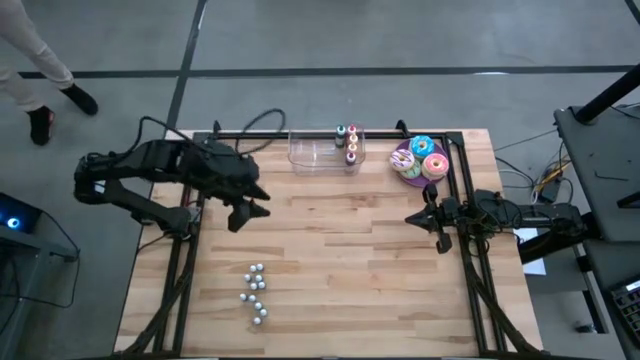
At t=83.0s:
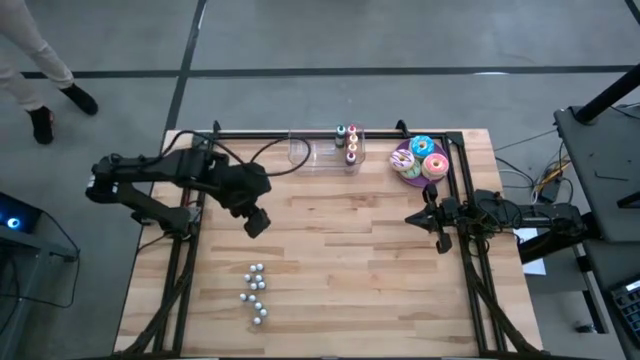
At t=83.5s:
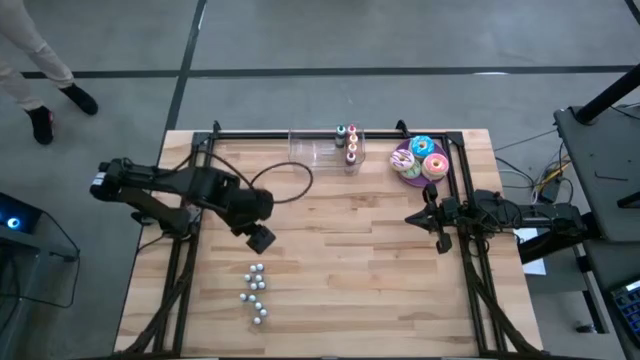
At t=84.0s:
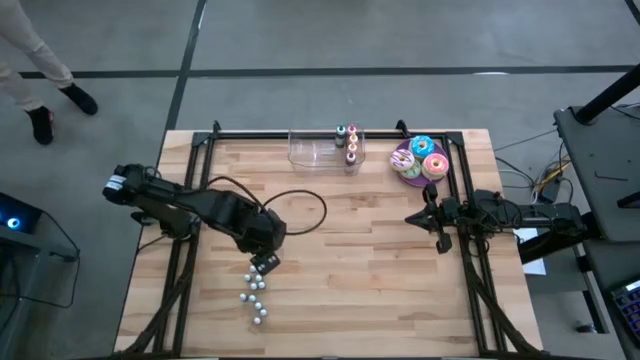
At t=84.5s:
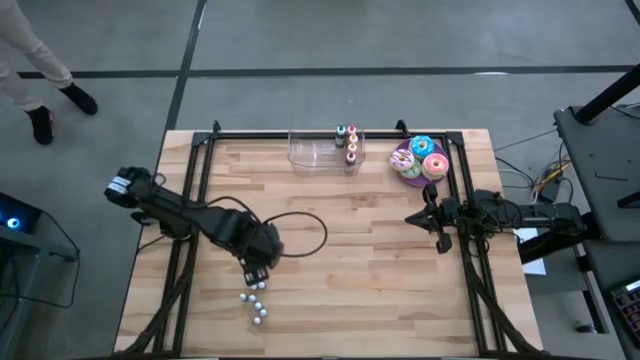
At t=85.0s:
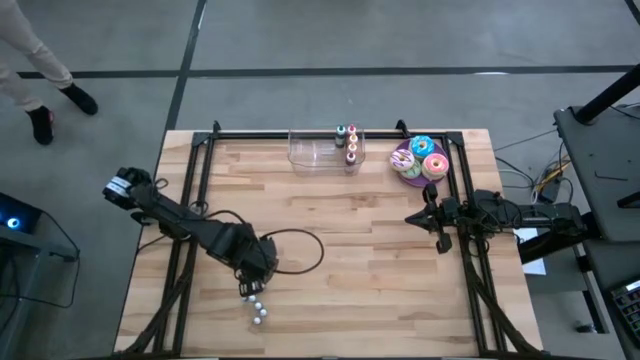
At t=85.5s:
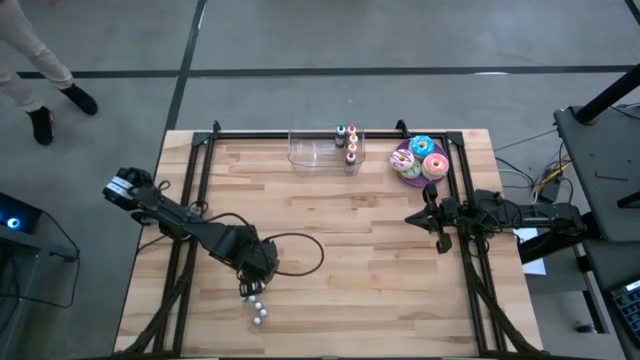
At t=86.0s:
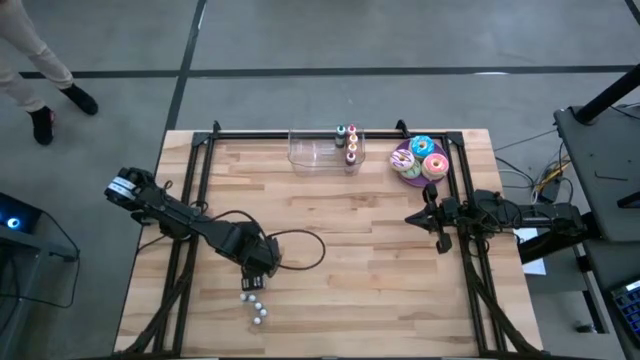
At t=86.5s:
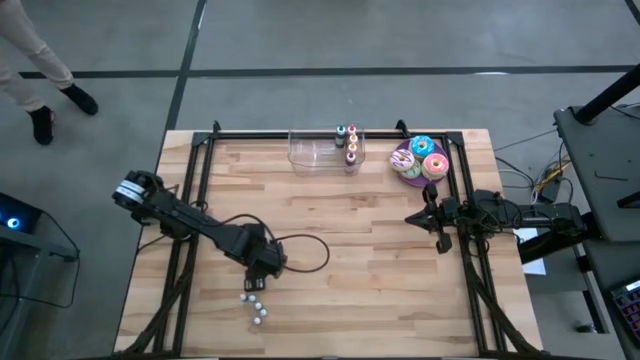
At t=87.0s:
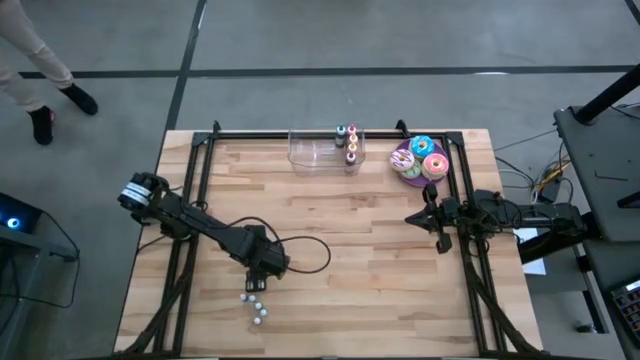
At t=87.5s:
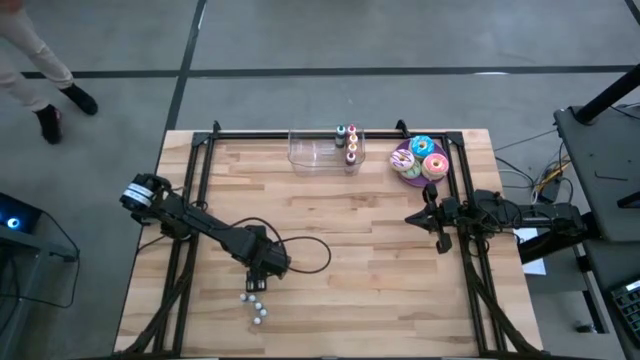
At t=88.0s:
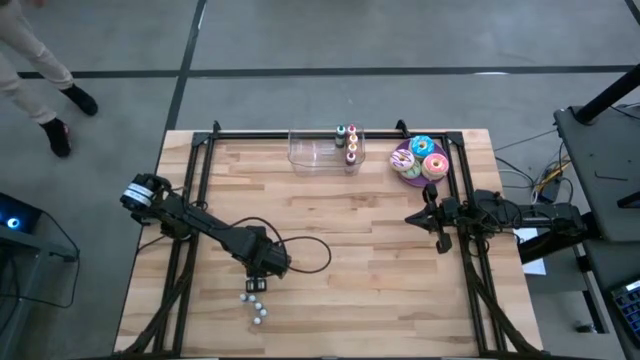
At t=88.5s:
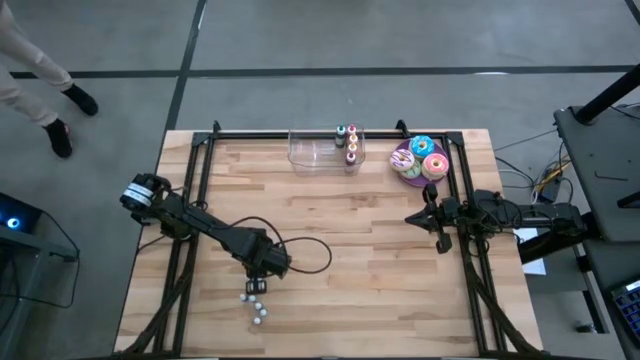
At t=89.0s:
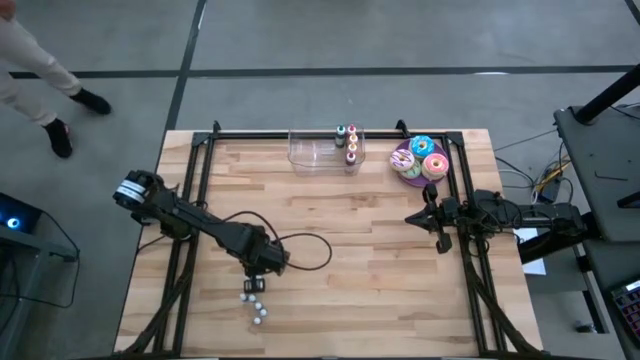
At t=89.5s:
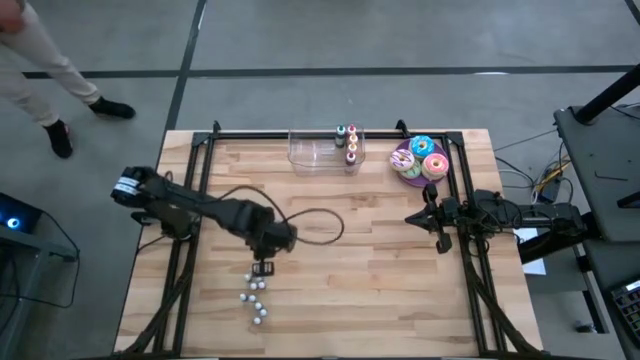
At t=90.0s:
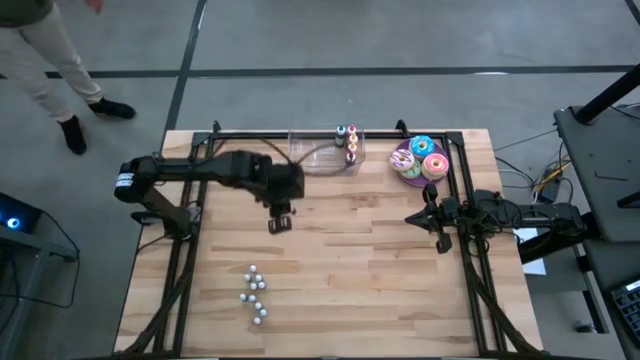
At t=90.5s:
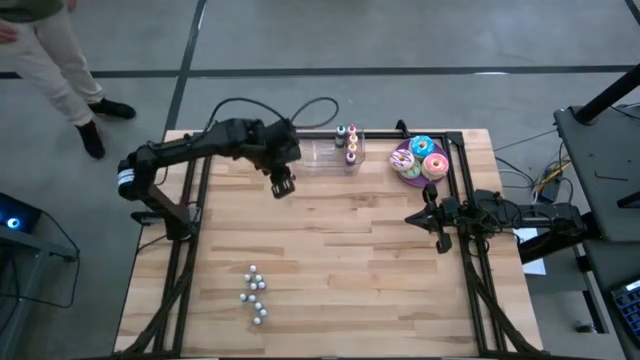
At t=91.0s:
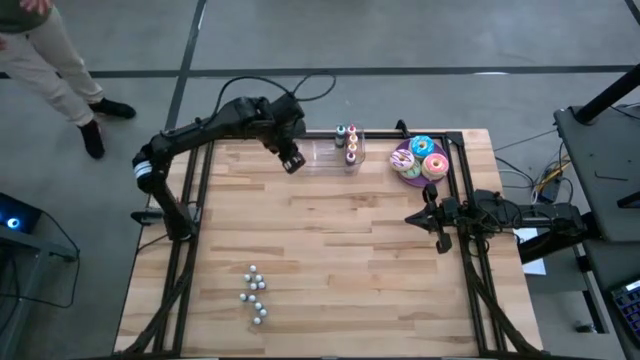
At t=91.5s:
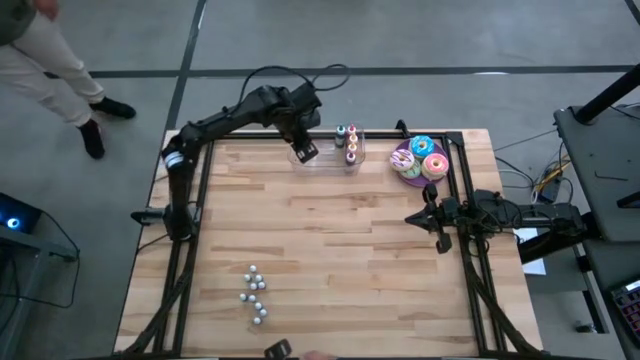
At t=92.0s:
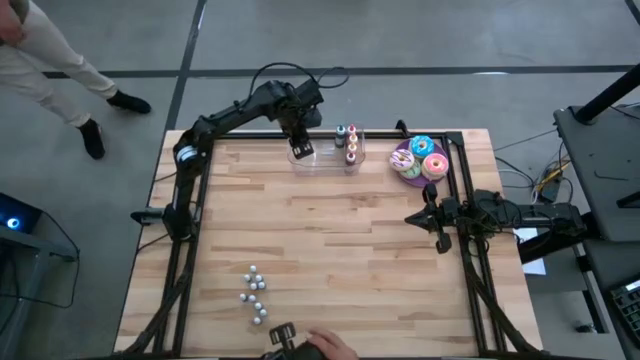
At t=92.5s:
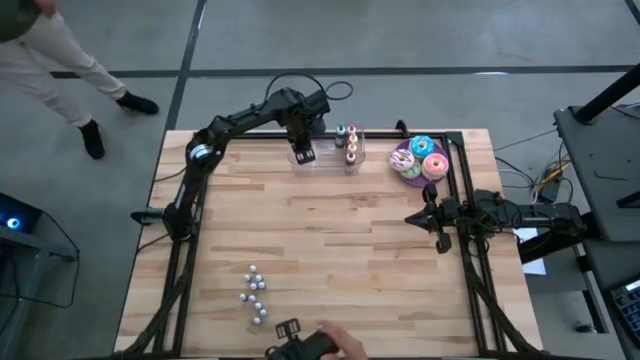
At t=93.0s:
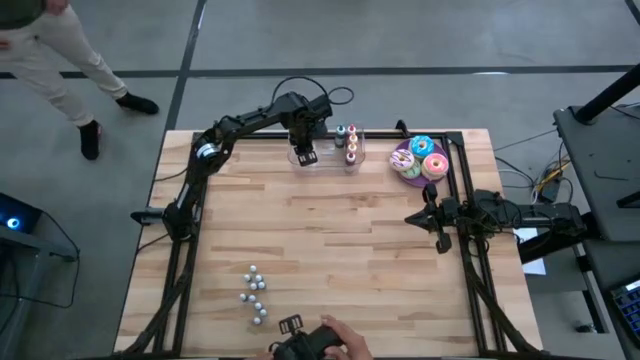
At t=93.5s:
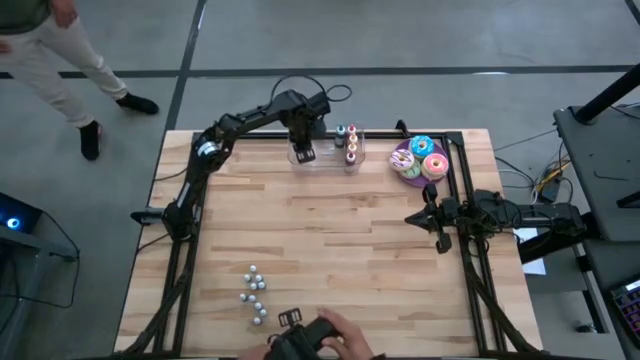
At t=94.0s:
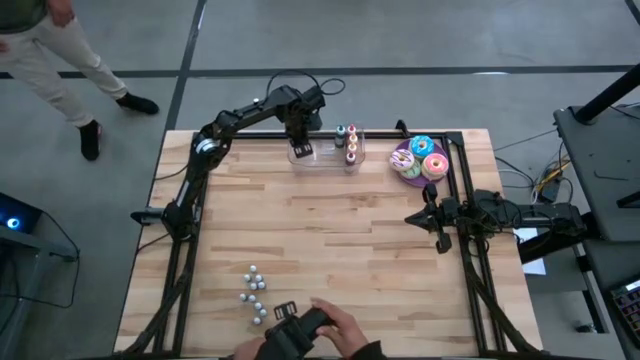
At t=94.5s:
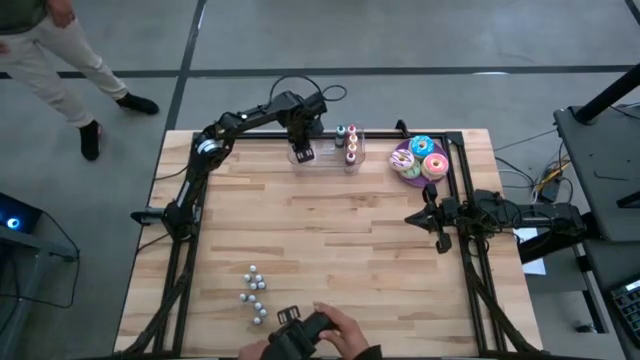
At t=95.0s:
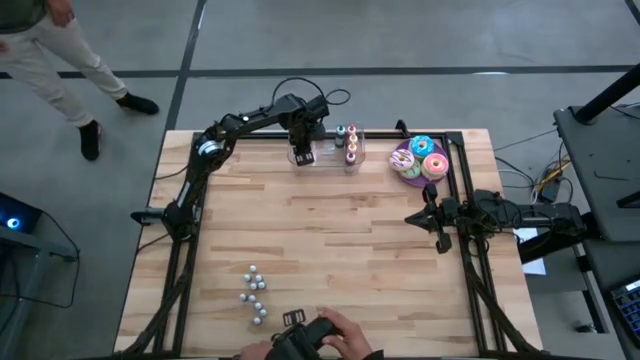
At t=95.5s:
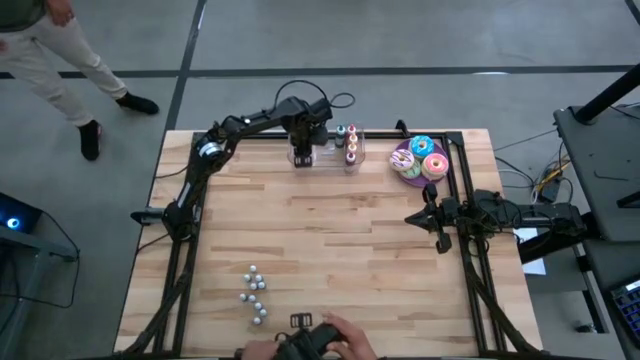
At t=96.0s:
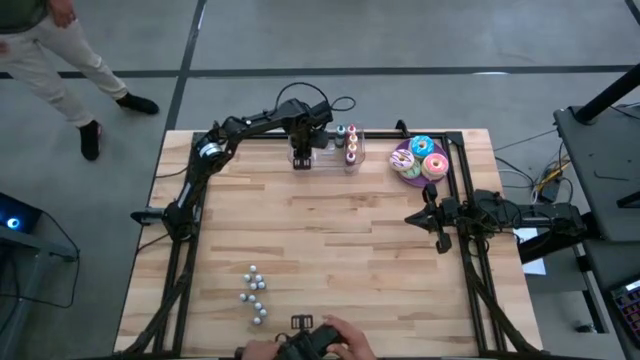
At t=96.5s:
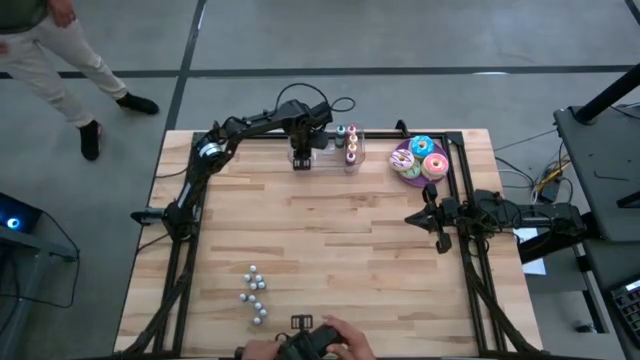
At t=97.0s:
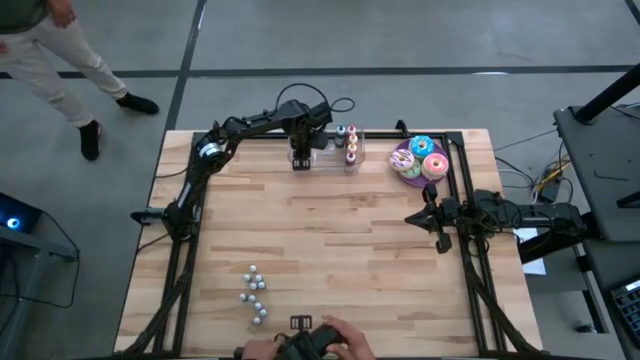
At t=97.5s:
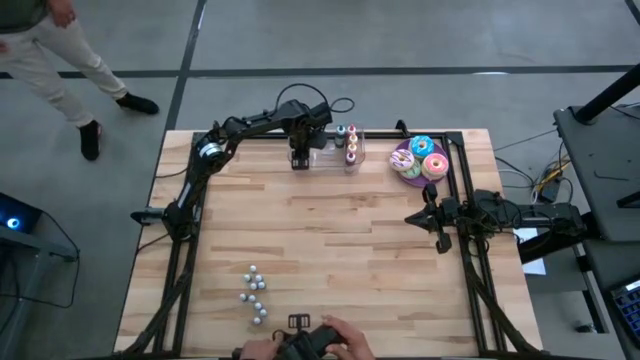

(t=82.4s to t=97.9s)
Task: Pick & Place food coloring
Put the small purple food coloring bottle into the transparent bin
